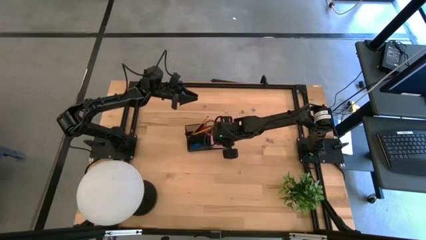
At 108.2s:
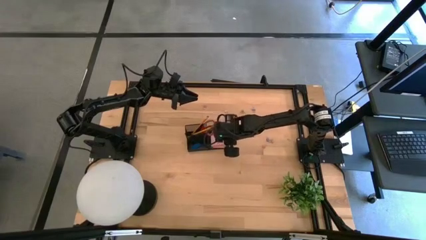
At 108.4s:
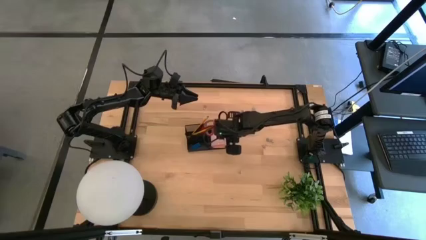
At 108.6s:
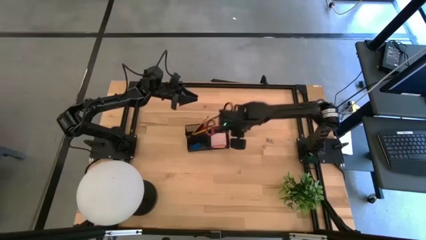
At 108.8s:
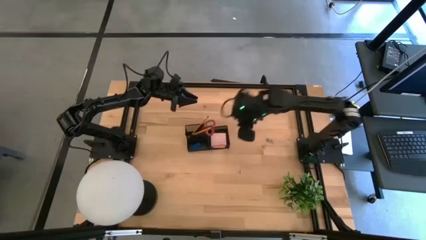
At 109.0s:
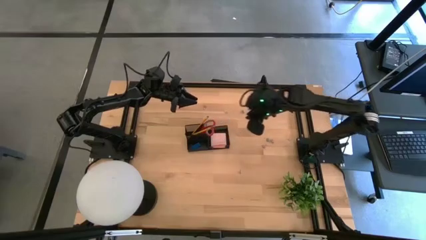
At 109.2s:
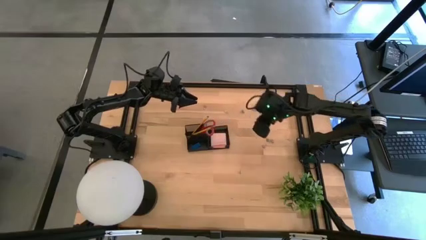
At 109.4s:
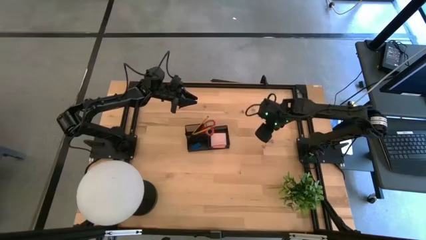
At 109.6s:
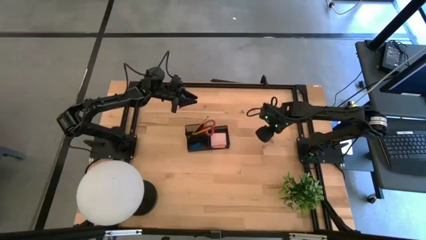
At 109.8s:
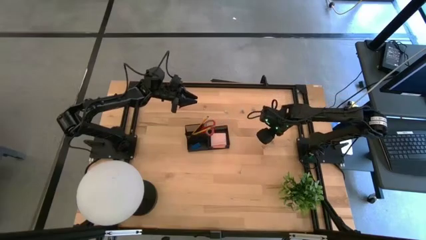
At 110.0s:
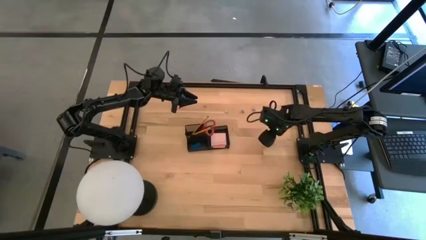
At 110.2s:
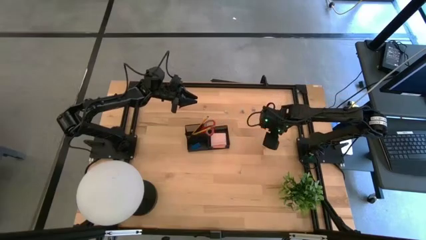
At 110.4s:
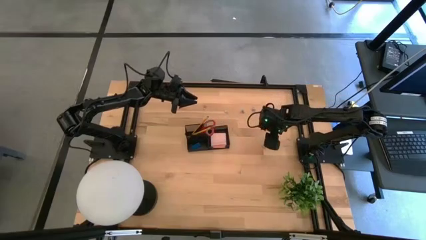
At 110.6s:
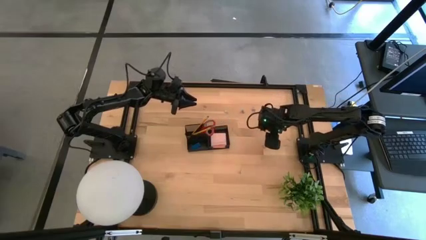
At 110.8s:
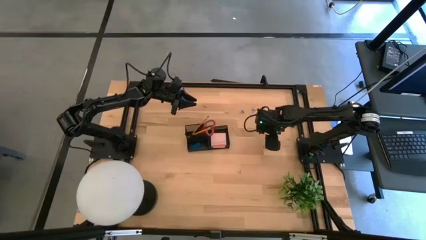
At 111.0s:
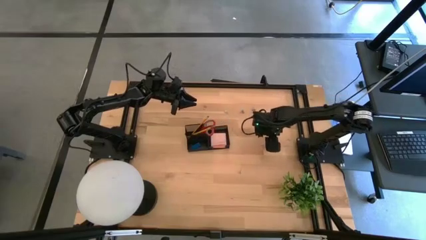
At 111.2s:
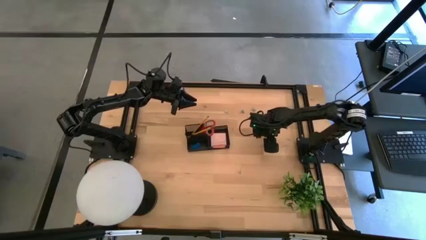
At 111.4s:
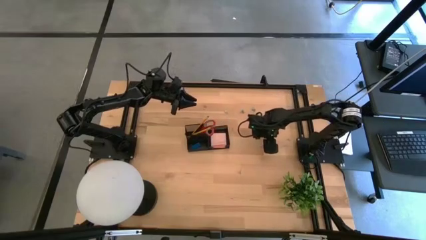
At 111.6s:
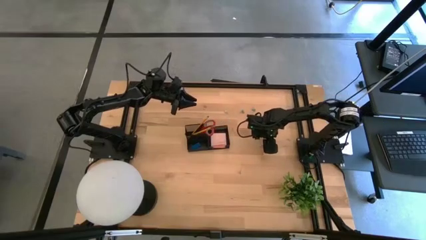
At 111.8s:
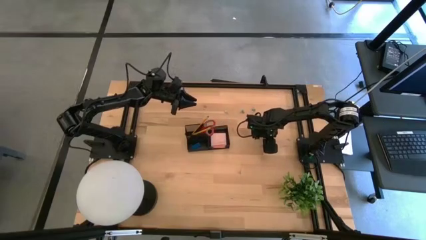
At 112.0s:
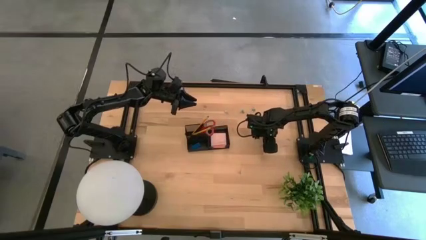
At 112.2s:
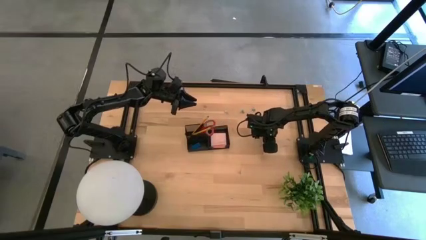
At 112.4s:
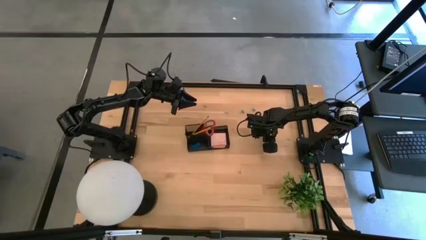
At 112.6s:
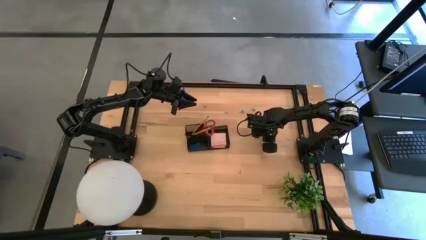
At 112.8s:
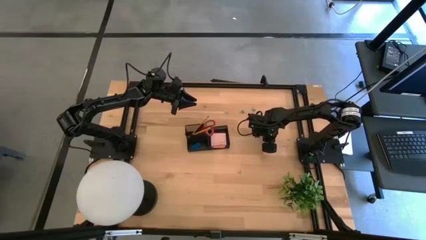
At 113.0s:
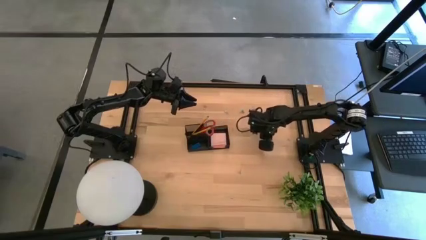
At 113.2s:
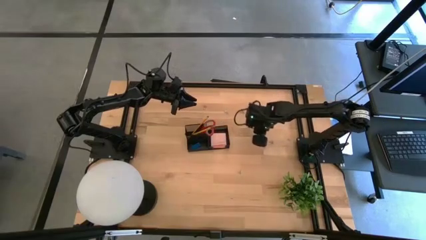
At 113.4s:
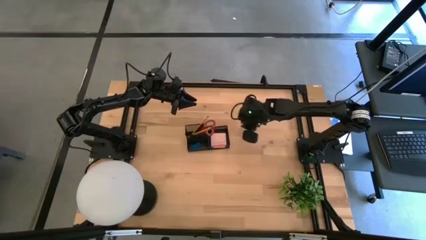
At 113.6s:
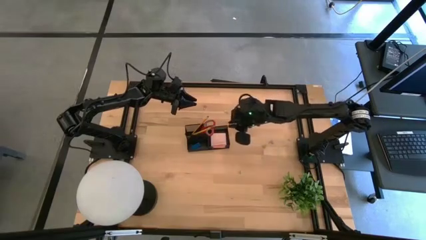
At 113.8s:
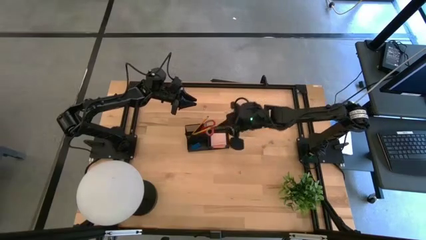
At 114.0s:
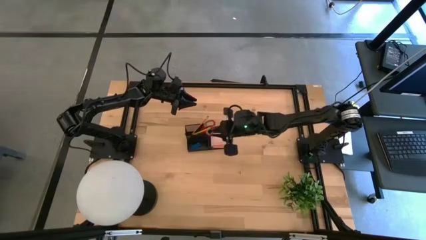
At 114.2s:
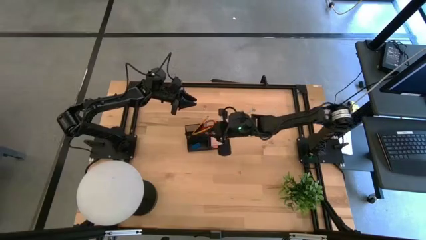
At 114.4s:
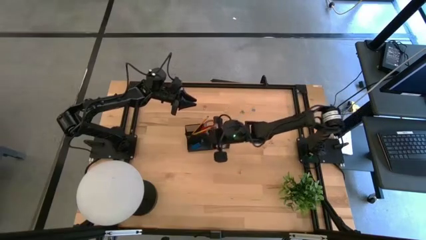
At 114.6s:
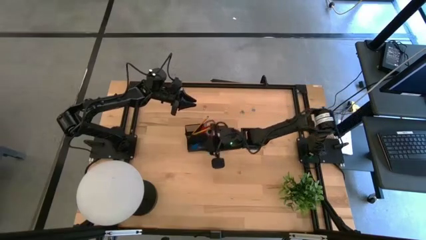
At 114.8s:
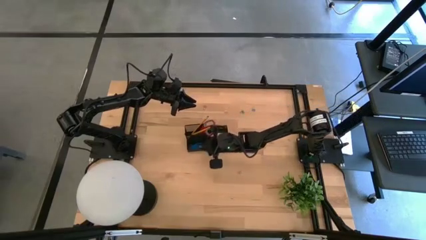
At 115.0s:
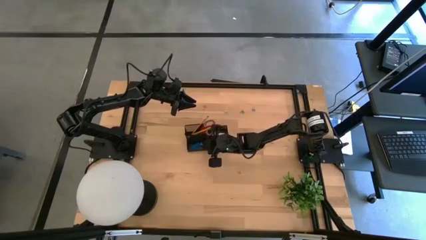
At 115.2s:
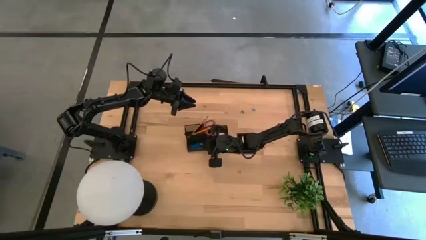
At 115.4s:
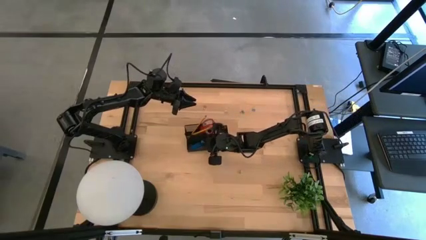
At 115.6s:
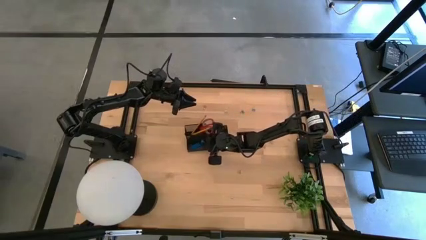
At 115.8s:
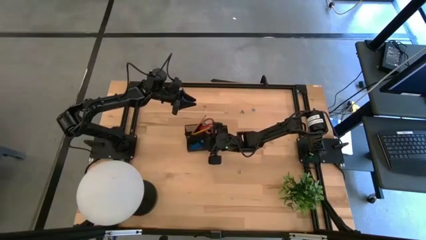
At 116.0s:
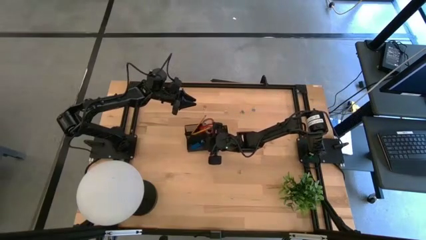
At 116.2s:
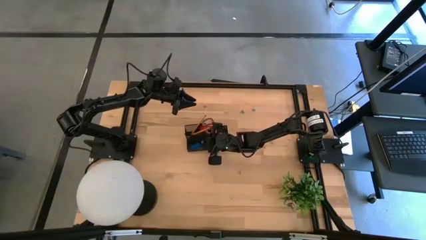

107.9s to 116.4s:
Task: Pick and place office supplies into organizer
Put the blue binder clip into the desk organizer

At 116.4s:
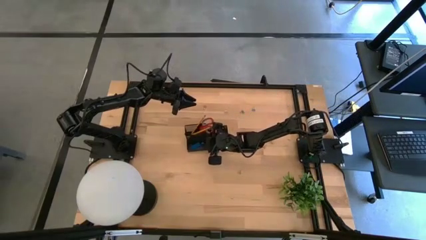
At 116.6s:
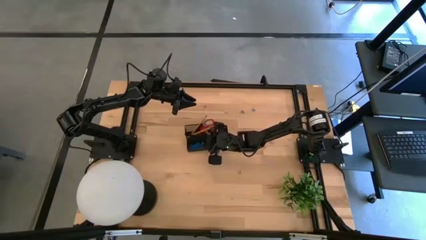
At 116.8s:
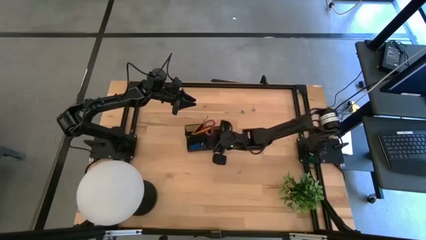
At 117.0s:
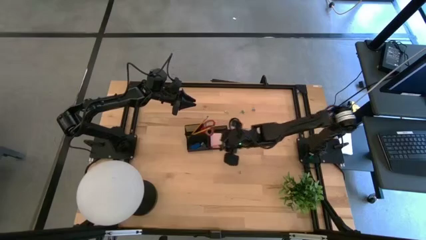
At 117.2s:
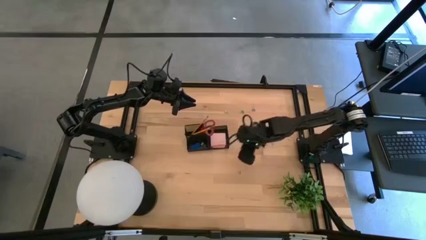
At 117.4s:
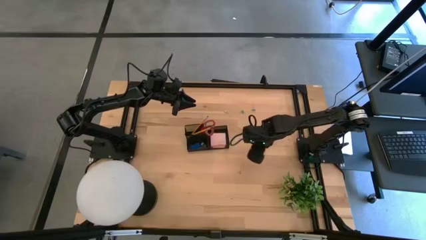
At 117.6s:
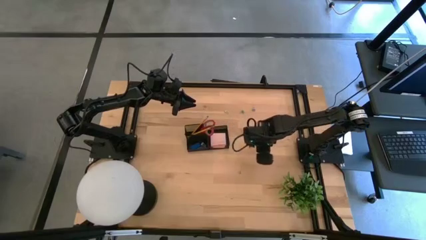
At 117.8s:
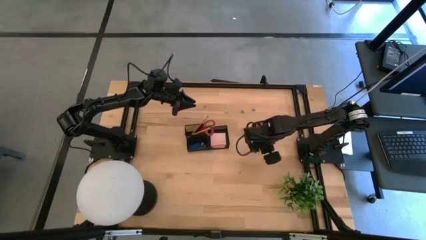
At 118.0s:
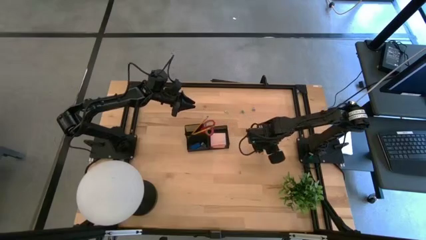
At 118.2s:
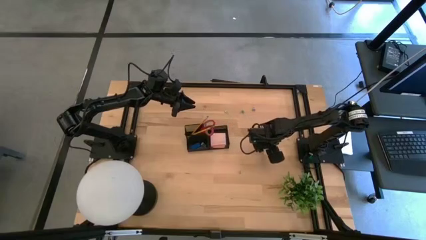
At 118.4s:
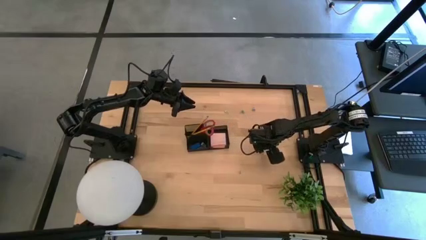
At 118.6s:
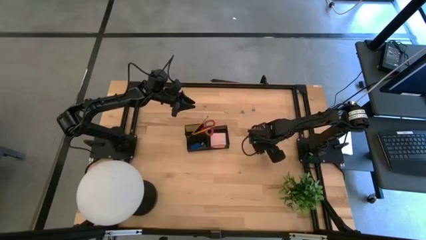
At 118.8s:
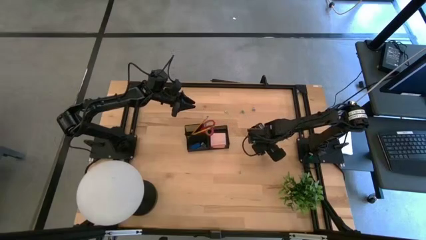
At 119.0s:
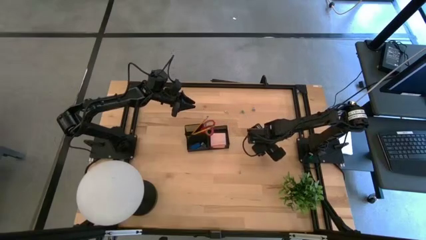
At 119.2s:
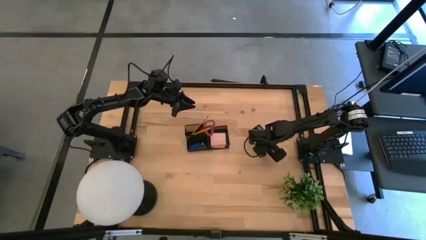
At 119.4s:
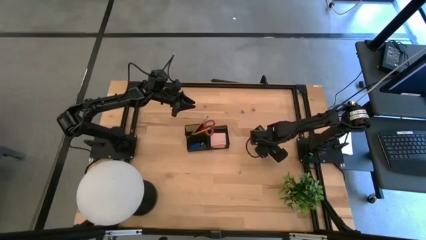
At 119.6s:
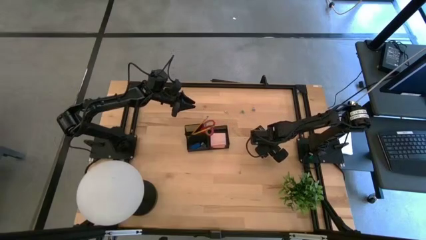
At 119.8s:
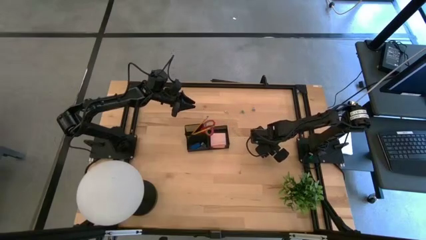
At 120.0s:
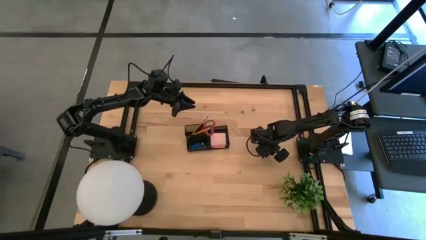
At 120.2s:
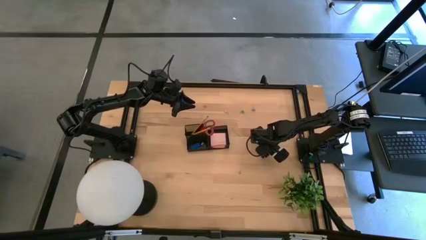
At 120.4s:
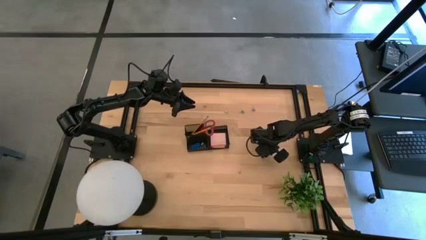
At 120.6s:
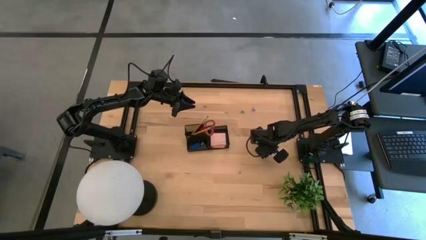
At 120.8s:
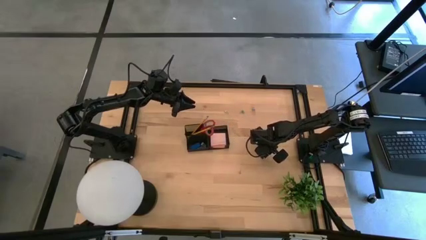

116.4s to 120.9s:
Put the pink binder clip into the desk organizer

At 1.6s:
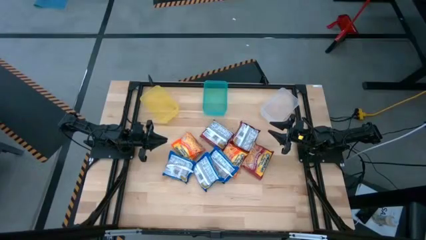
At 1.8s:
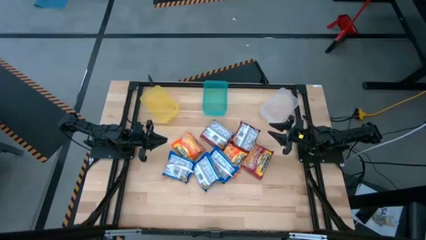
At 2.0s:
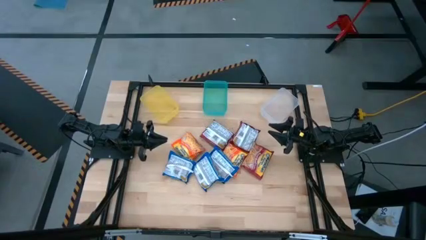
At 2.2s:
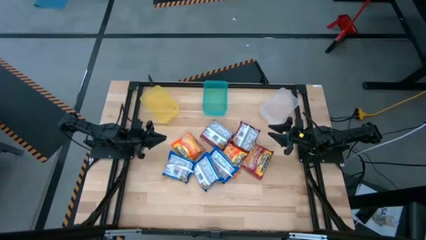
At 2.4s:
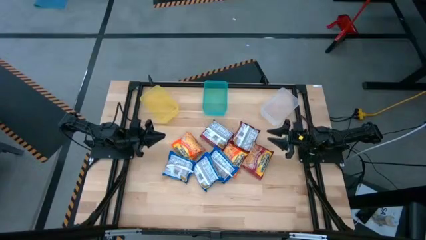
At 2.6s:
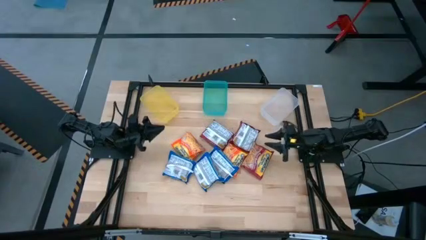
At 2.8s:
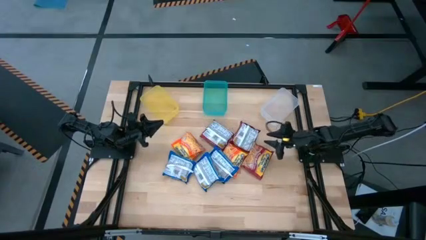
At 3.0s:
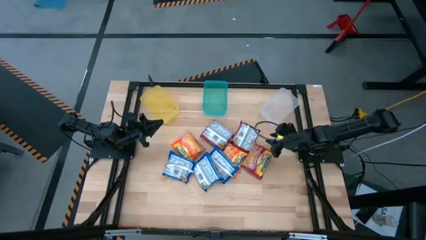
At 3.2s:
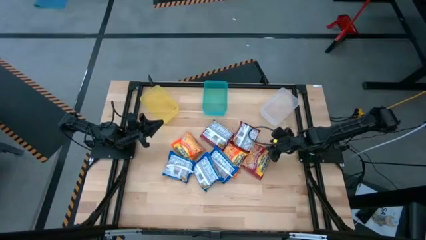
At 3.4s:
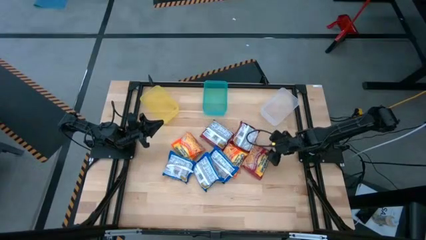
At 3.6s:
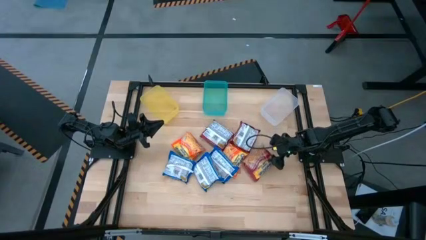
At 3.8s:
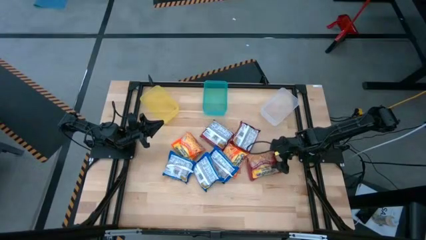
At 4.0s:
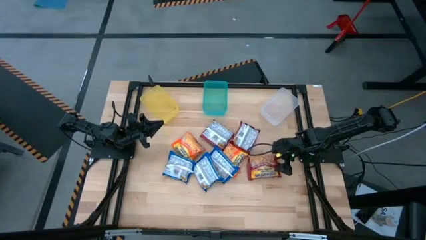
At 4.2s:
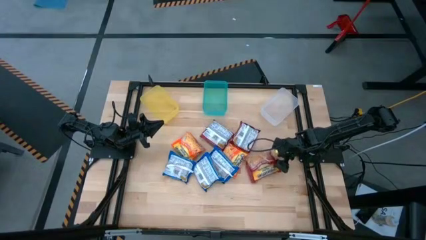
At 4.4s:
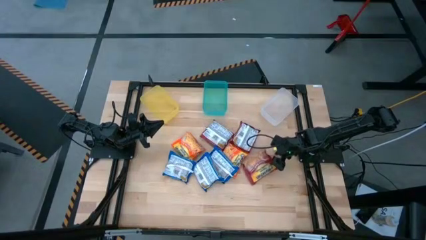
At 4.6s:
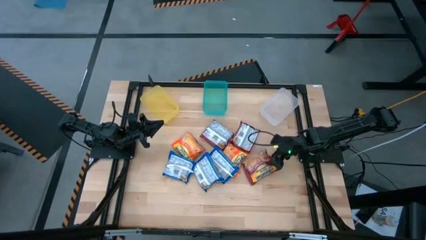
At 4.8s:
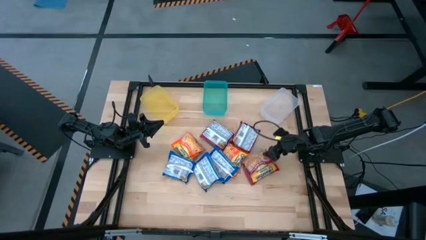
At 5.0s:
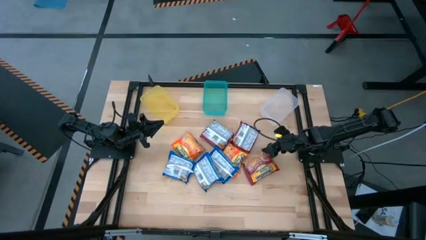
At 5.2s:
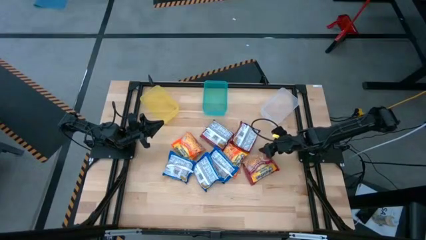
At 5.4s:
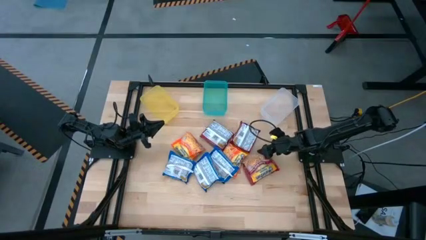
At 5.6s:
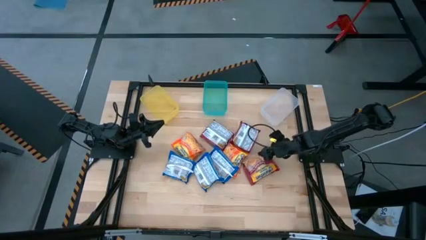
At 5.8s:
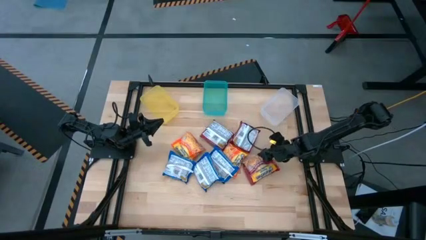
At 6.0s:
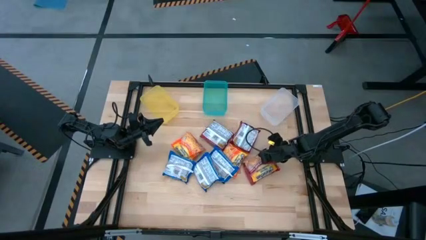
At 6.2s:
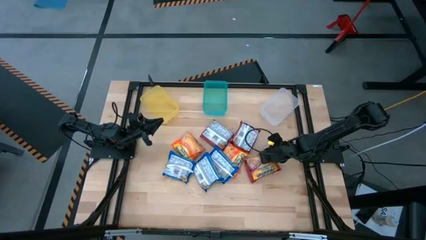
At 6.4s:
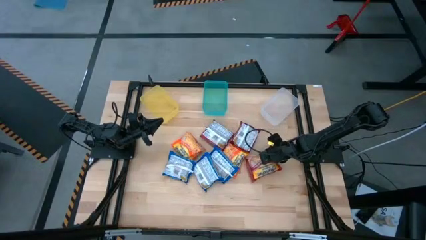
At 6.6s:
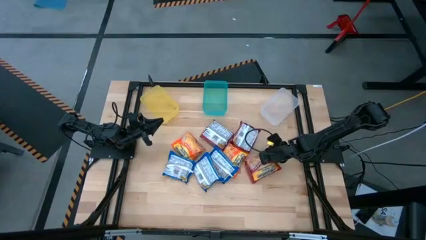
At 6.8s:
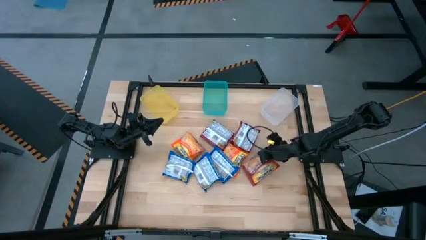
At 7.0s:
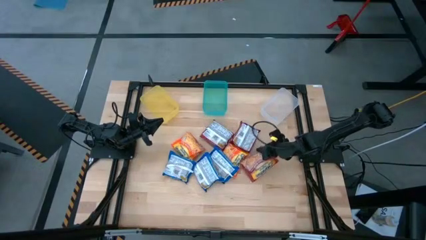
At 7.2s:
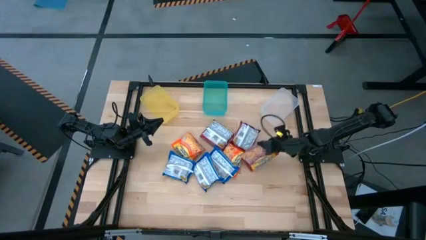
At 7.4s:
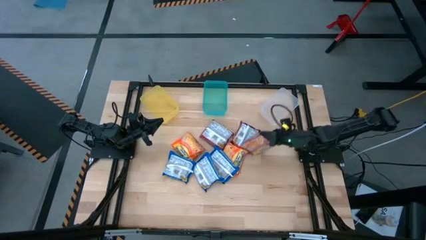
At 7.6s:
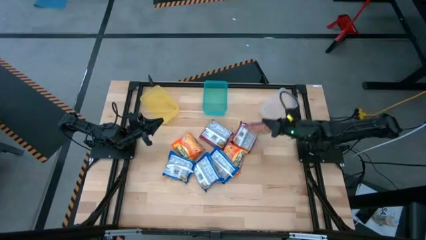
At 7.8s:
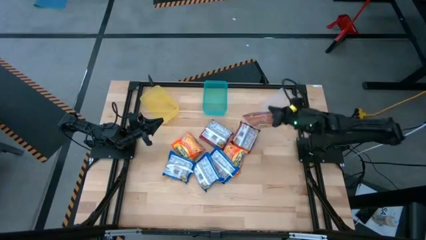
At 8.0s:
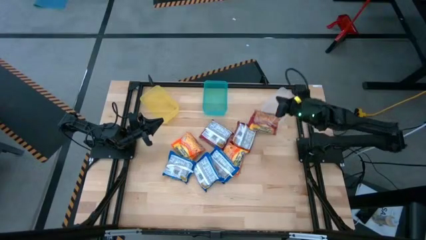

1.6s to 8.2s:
Task: Sort Maruchan noodles
Put the bottom red noodle pack into the transparent bin
